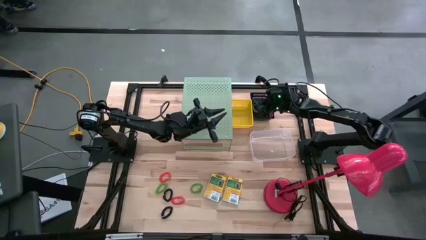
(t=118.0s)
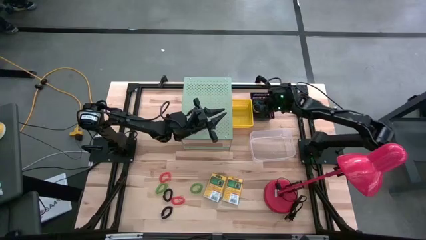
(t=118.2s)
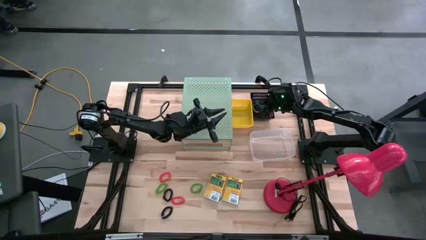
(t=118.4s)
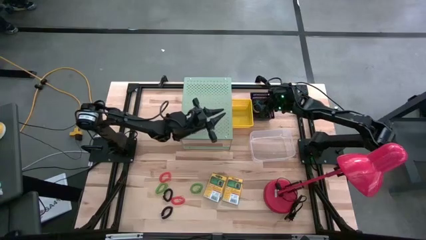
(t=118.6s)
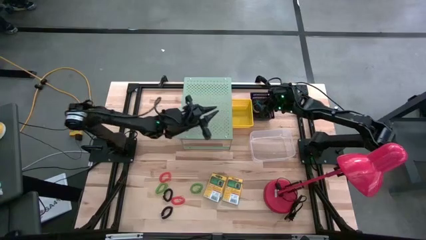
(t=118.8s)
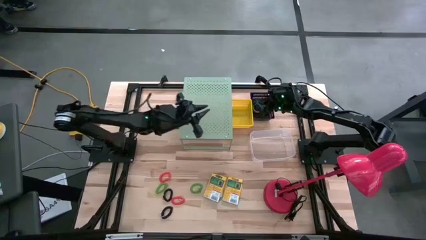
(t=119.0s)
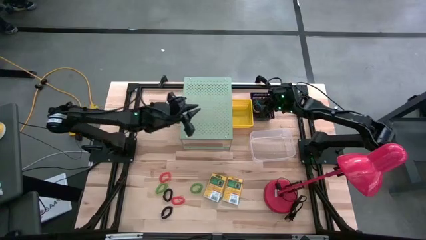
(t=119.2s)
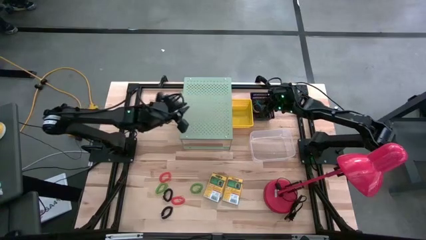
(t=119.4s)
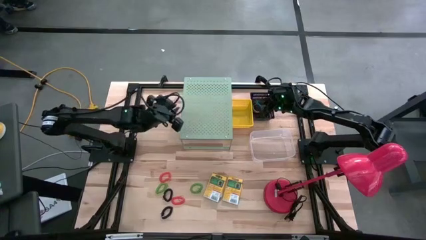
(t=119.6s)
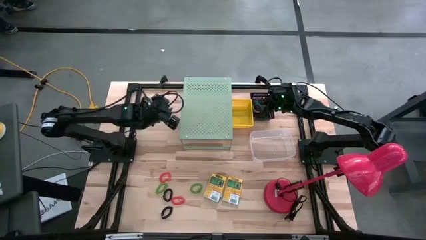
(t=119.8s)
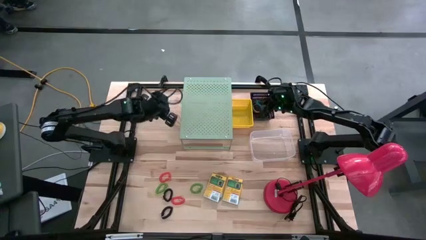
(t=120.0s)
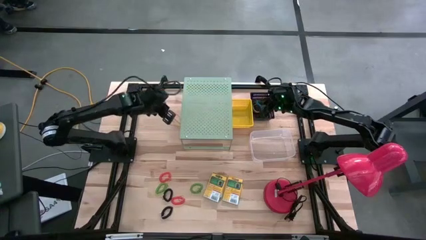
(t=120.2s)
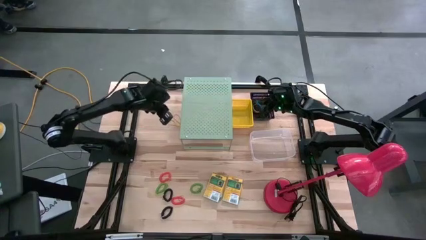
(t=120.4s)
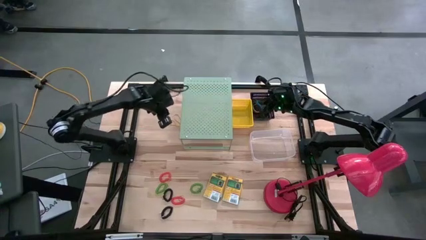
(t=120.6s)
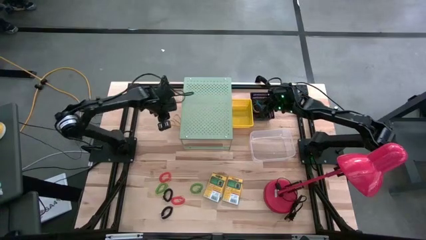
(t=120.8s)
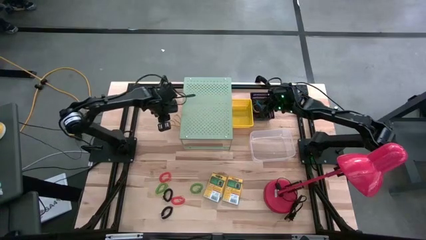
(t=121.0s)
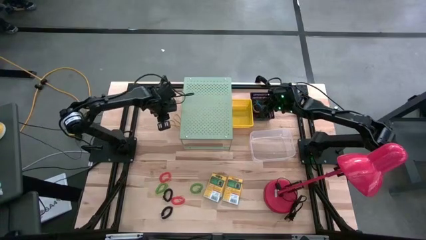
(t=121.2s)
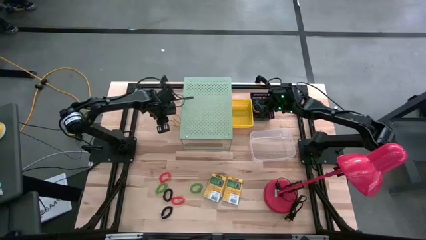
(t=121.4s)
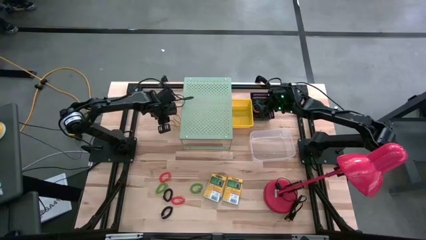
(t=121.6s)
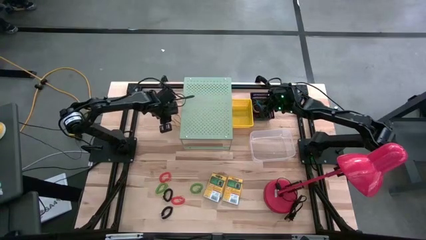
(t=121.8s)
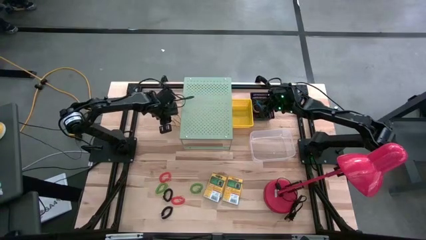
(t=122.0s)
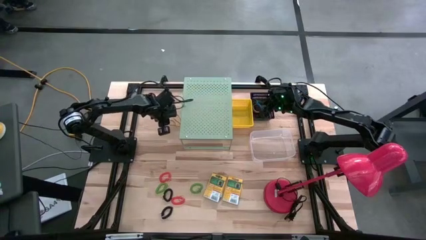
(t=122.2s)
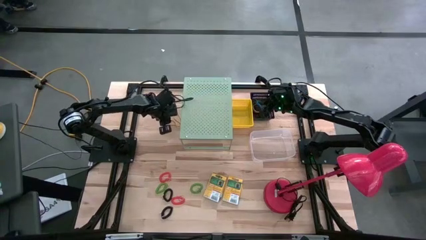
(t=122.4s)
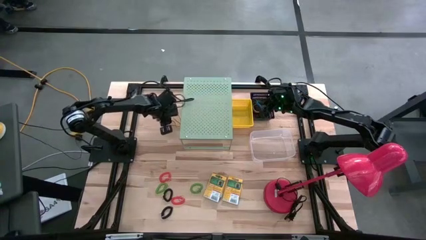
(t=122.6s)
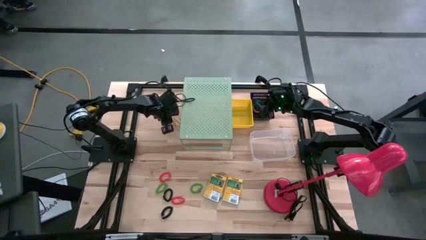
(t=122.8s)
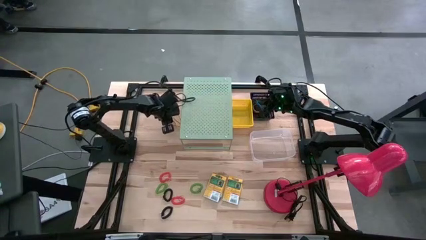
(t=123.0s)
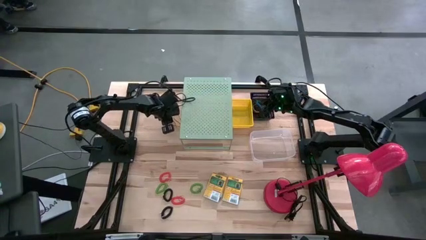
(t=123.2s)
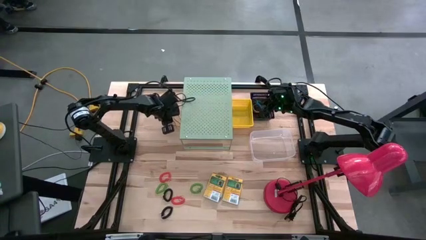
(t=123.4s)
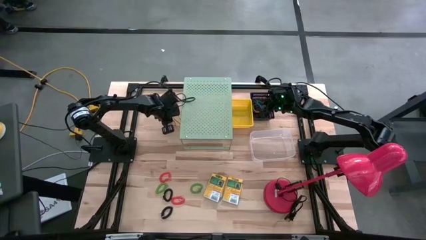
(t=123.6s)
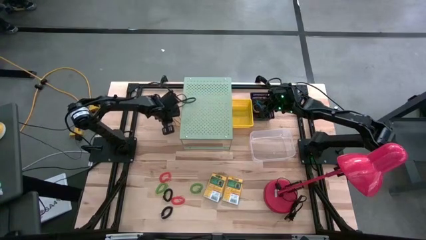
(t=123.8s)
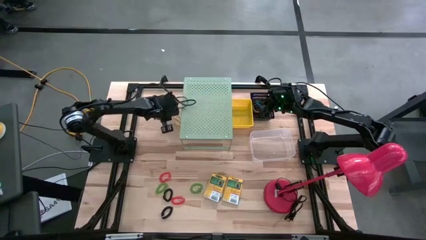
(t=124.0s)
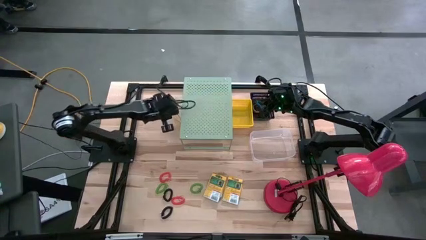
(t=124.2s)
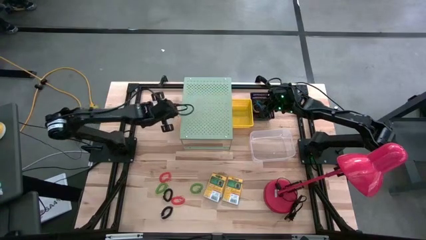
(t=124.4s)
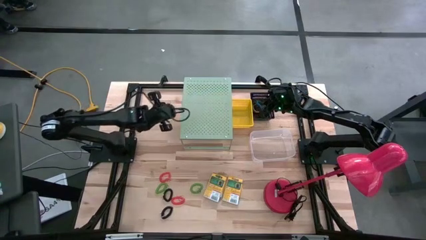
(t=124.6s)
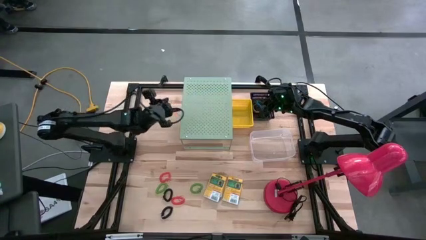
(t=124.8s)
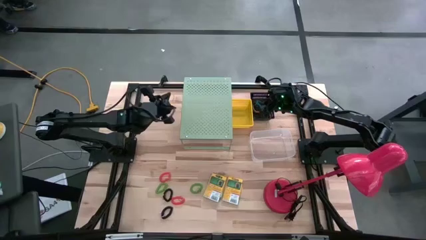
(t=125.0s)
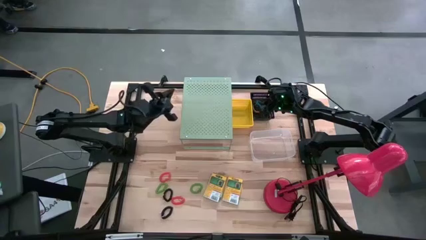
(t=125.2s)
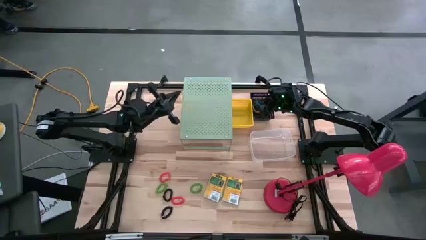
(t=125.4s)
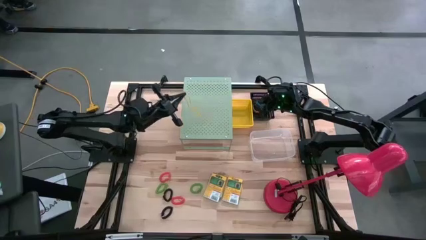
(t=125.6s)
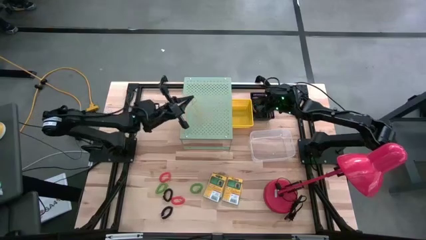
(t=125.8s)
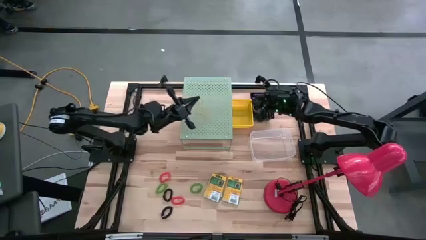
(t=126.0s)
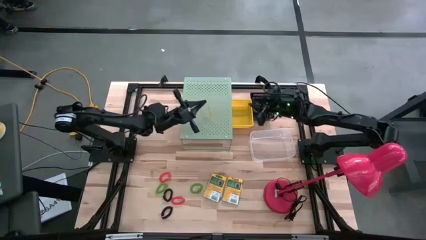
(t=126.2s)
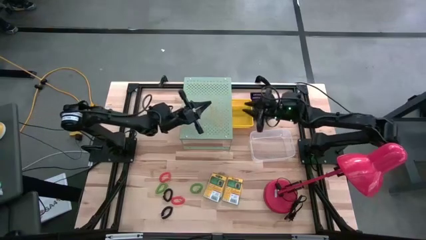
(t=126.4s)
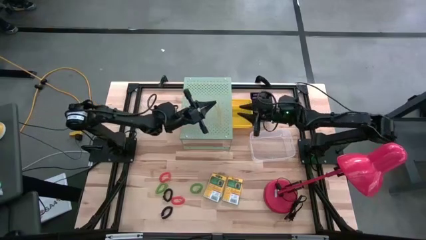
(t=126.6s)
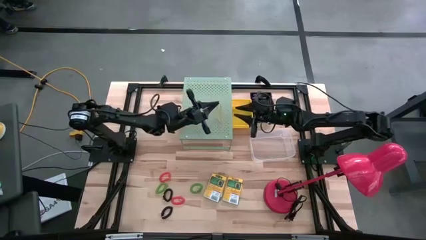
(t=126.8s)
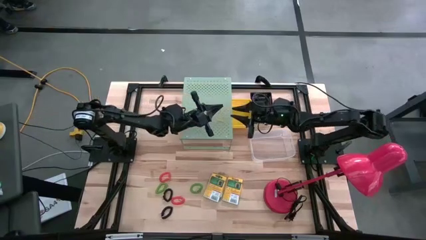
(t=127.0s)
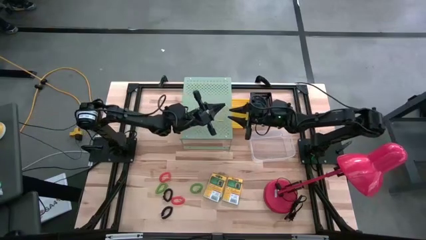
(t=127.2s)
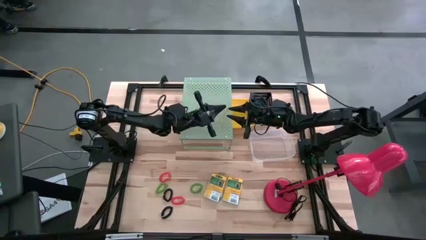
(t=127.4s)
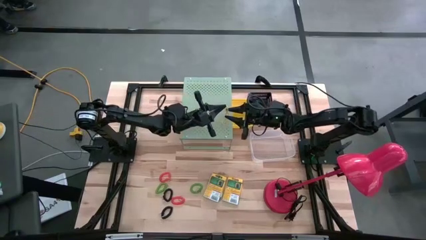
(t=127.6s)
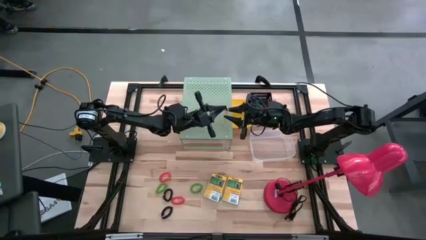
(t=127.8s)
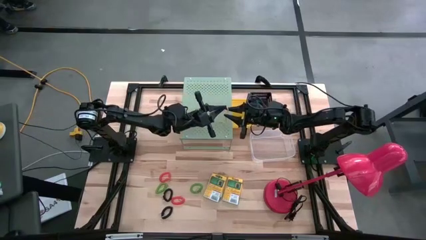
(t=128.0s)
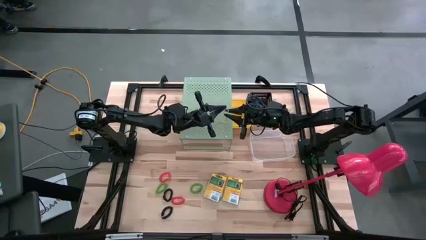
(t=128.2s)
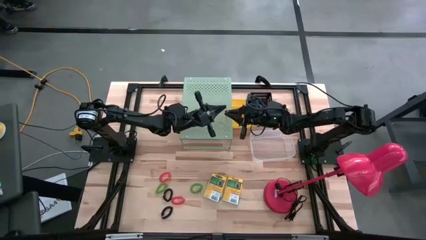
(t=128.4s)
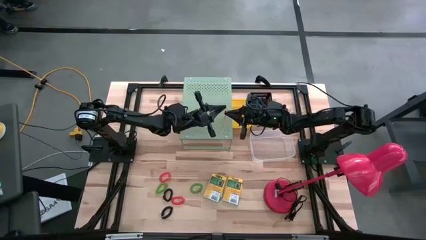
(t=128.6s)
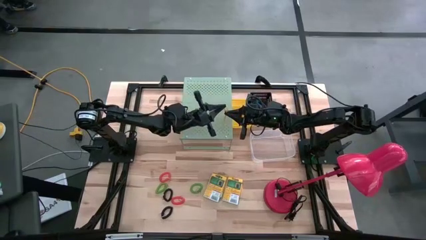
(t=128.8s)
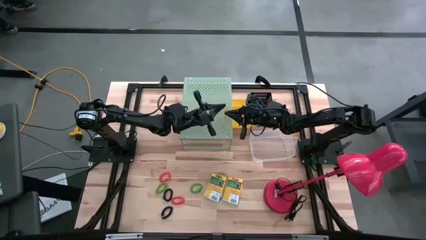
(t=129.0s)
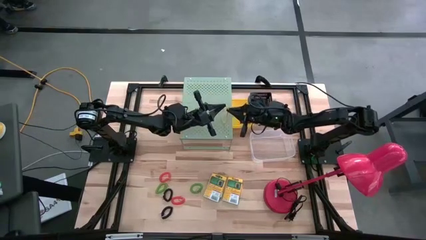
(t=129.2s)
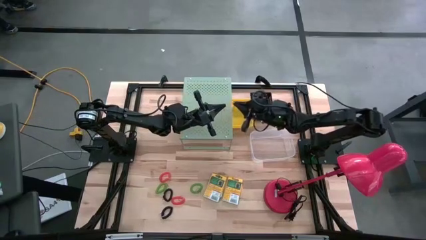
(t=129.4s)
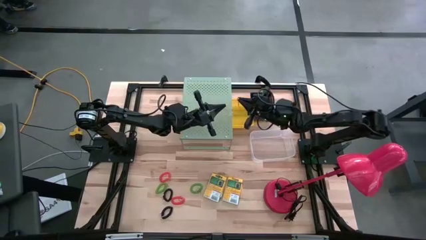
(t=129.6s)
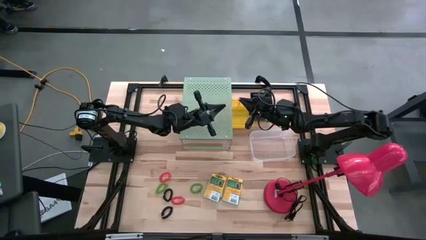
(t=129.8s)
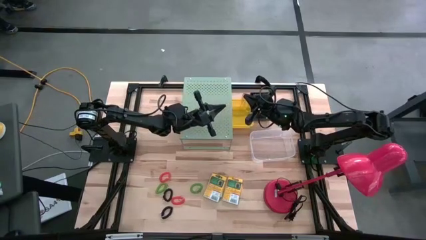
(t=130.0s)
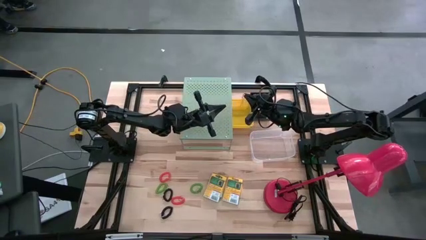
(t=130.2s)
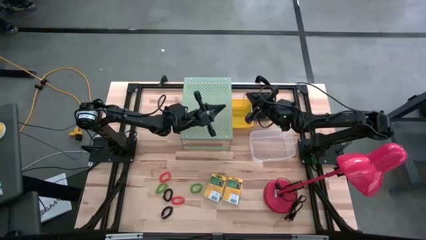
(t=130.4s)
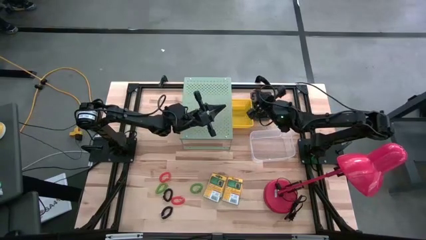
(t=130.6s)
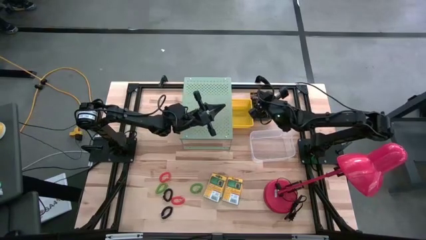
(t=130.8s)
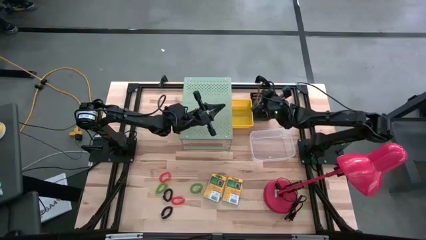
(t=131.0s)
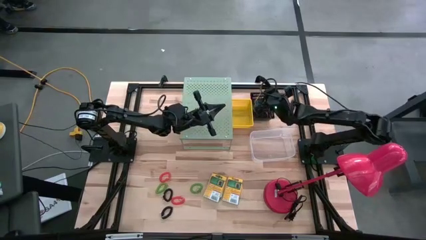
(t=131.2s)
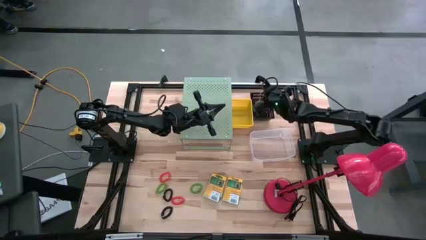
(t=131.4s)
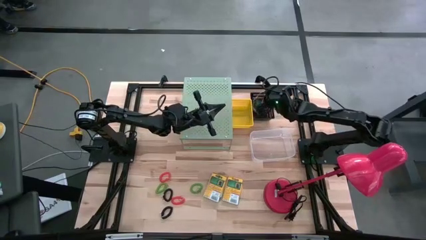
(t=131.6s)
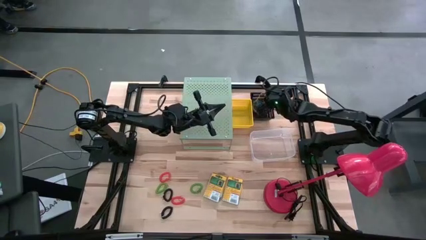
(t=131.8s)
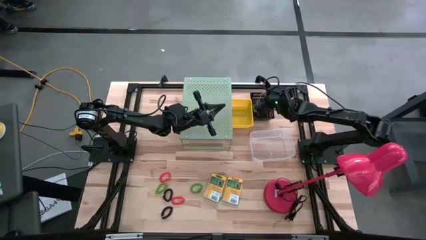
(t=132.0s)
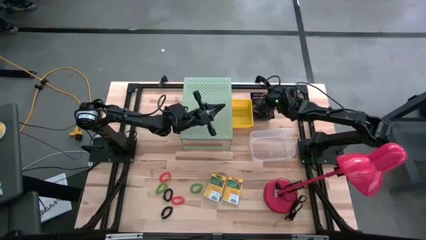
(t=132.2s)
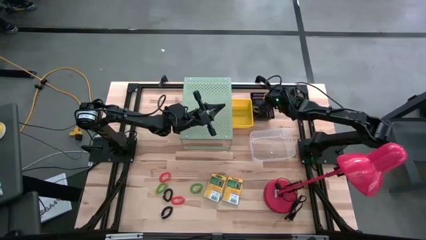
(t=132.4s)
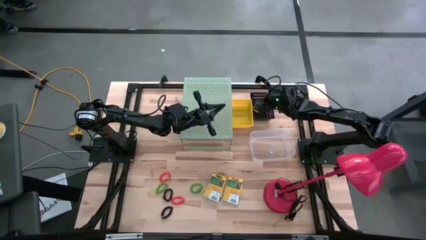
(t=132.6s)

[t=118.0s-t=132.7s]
Task: Pick & Place Office Desk Supplies
Put the yellow rubber band into the black bin
